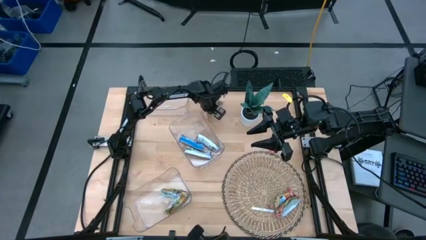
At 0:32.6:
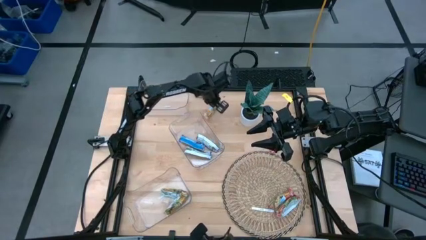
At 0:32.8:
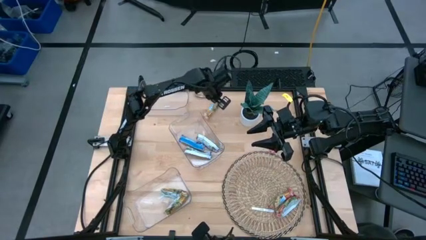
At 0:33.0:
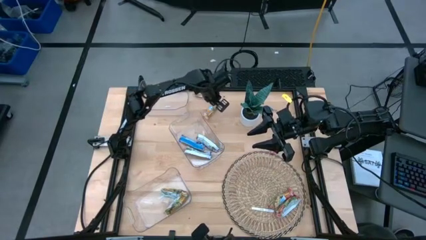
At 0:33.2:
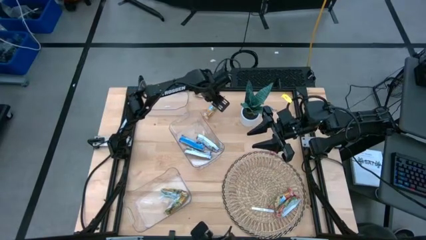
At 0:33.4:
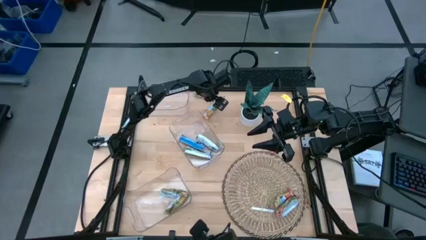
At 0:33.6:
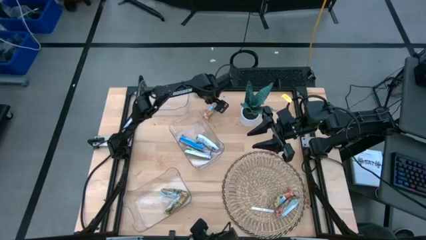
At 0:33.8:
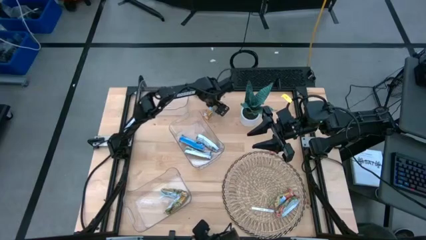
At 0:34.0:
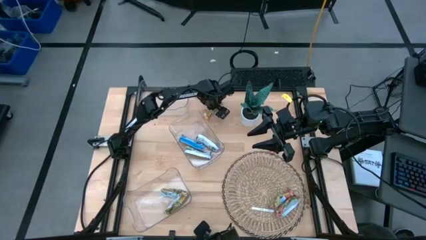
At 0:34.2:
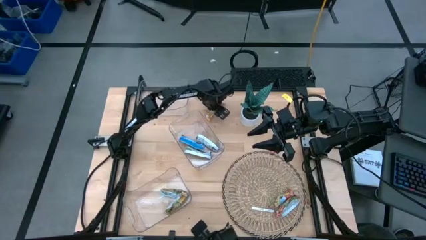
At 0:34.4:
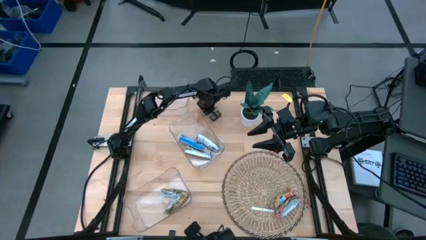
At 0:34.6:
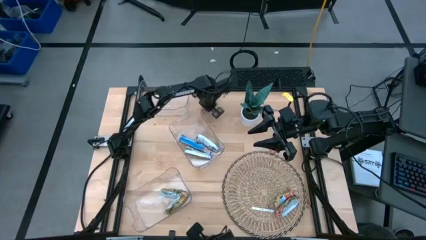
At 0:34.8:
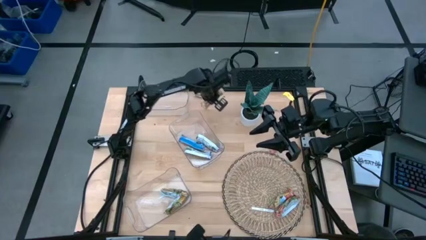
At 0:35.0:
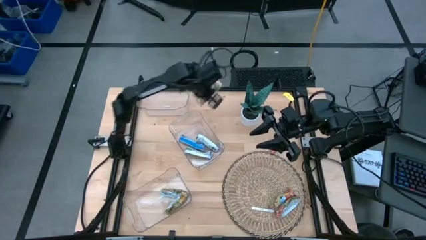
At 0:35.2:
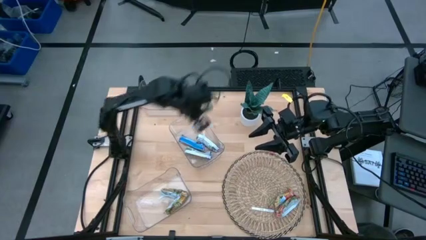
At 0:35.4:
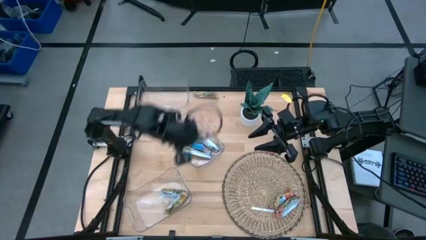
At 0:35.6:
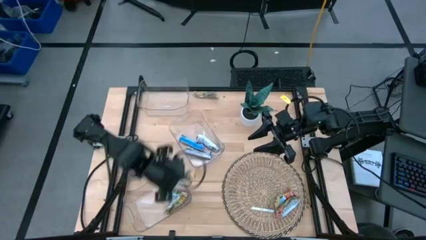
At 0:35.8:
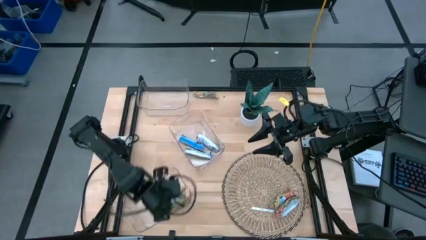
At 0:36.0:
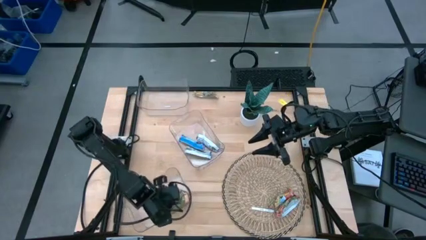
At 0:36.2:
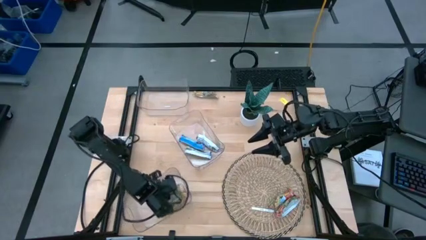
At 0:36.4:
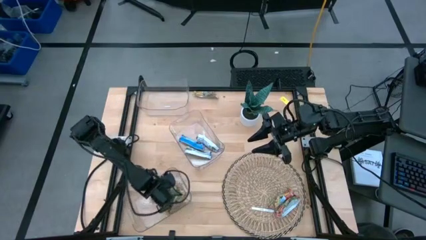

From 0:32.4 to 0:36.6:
Task: Pick and place Granola Bars by type
Put the yellow granola bar into the bottom transparent bin

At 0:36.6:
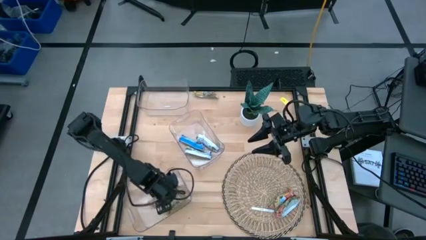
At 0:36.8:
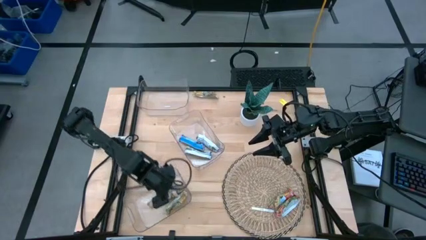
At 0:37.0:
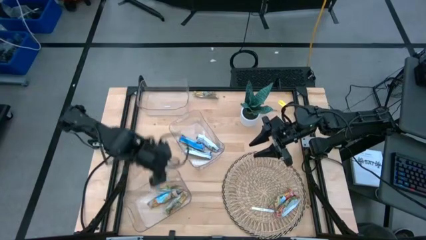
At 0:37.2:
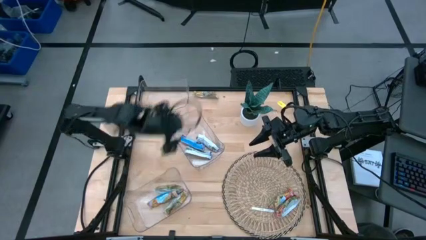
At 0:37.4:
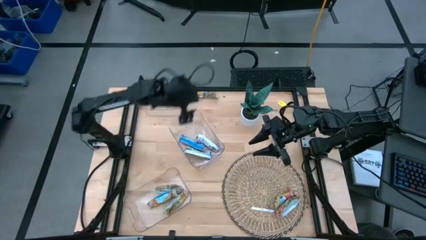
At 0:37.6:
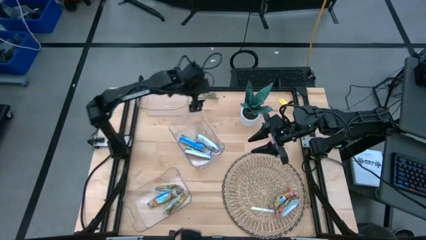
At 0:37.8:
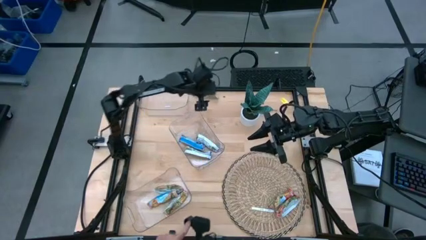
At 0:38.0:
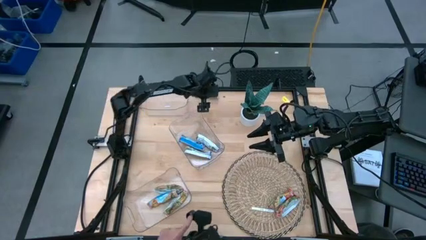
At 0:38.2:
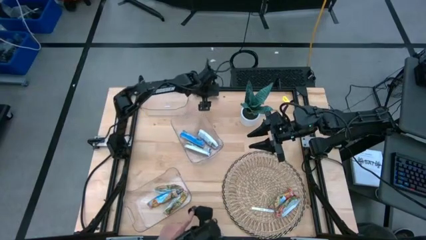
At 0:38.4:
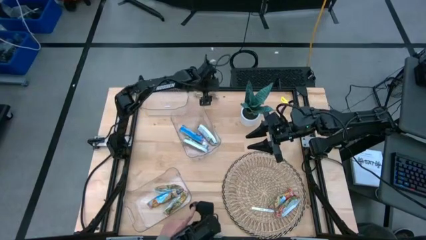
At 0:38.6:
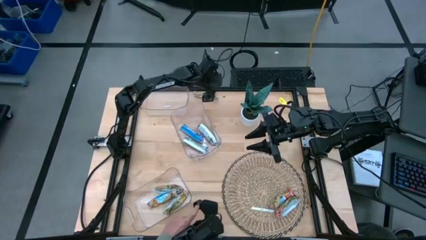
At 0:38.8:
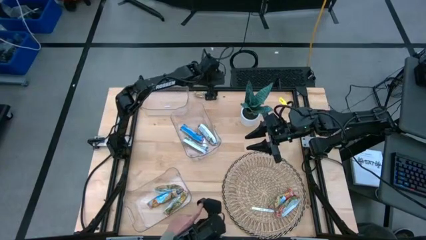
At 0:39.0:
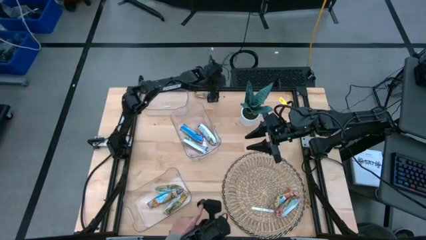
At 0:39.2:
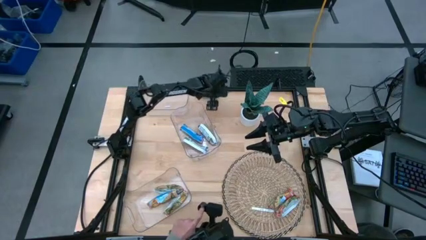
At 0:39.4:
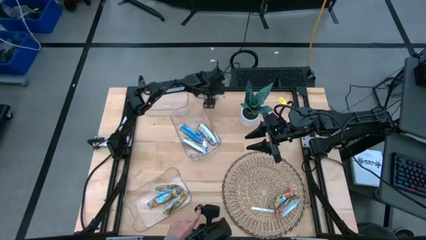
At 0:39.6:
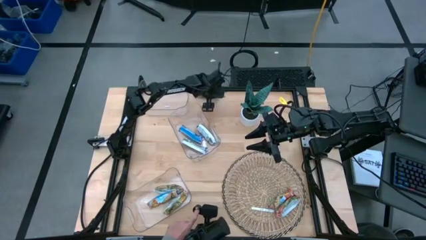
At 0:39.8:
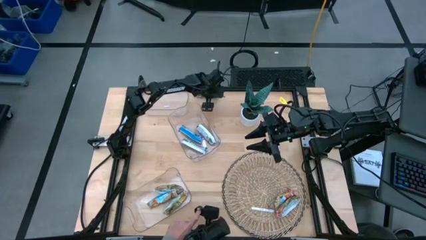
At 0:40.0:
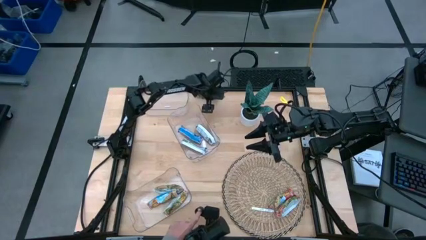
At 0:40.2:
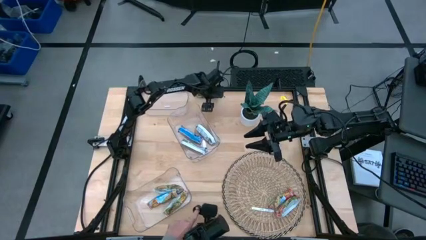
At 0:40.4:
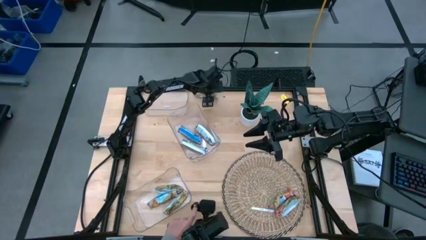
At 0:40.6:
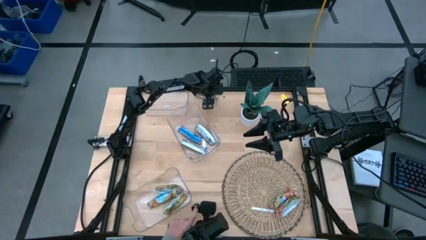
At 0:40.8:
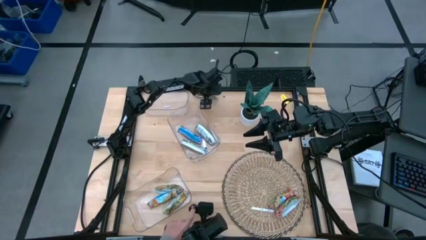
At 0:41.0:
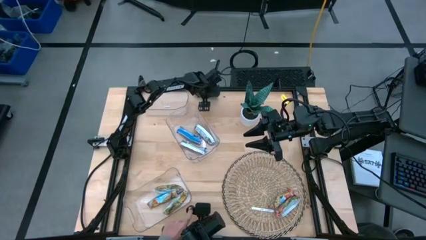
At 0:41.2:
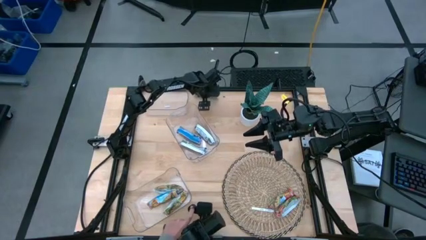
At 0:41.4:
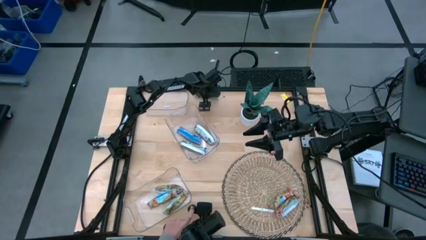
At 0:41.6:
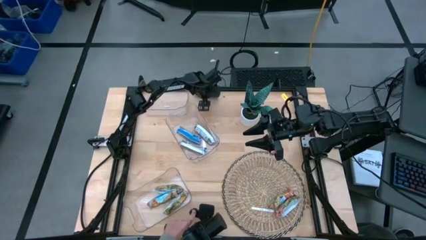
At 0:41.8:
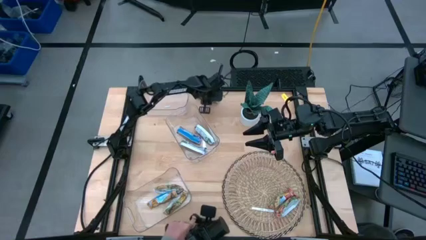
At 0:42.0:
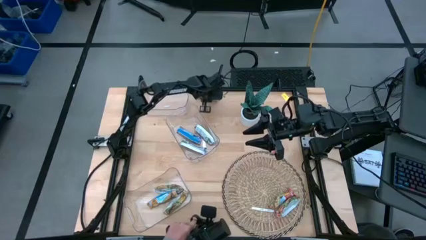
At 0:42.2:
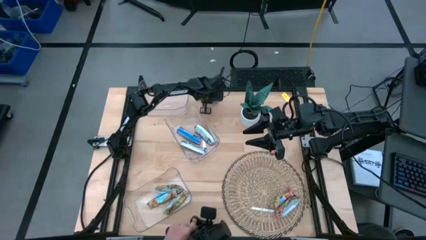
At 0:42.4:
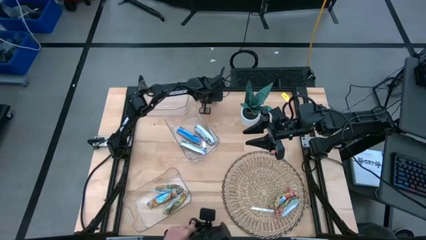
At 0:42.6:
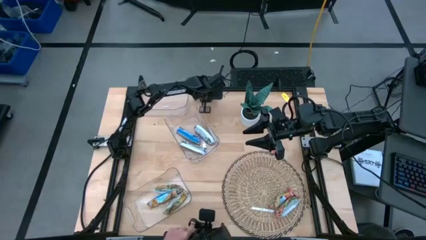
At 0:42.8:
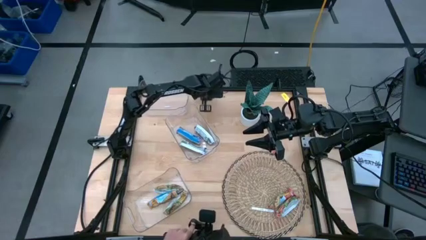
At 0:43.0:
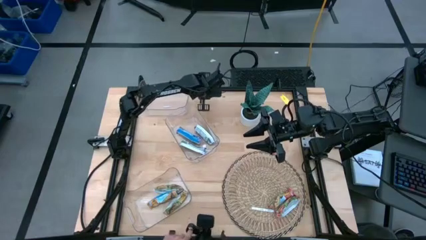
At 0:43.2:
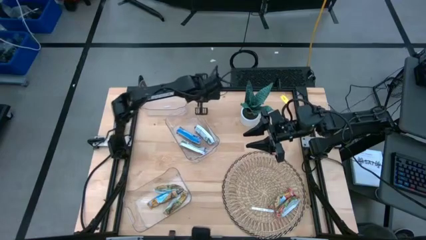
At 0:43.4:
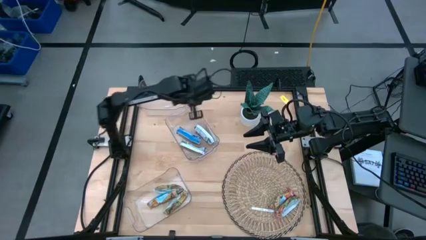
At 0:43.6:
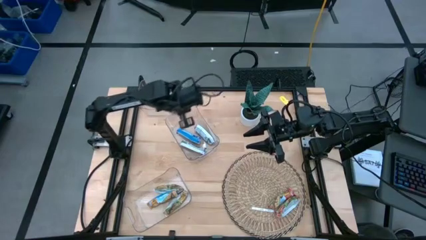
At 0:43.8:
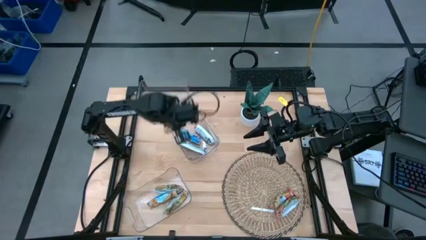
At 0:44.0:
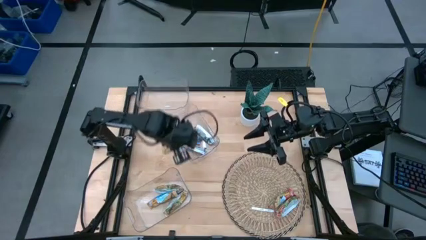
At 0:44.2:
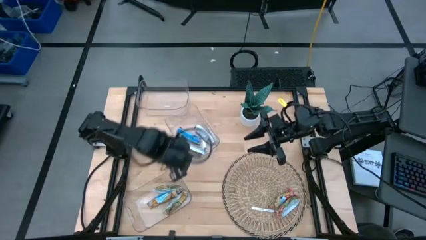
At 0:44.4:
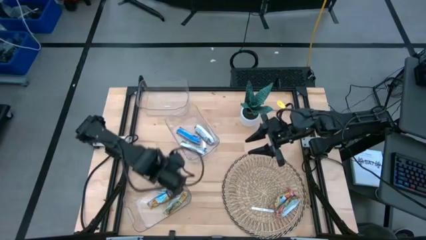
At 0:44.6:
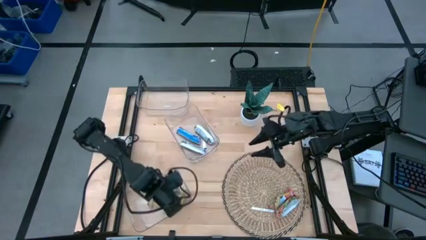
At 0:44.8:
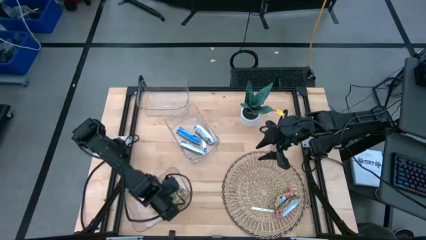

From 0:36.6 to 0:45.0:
Put the yellow granola bar into the bottom transparent bin

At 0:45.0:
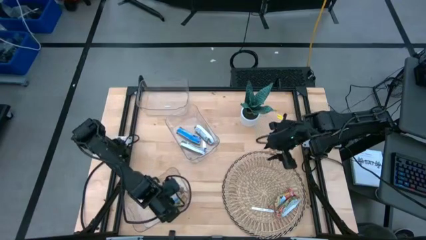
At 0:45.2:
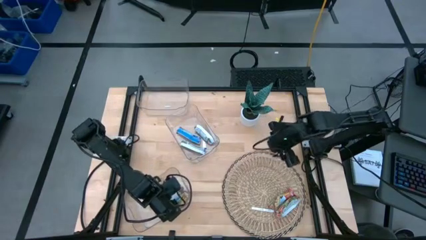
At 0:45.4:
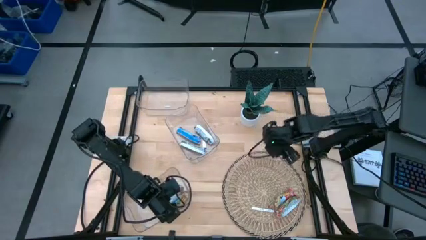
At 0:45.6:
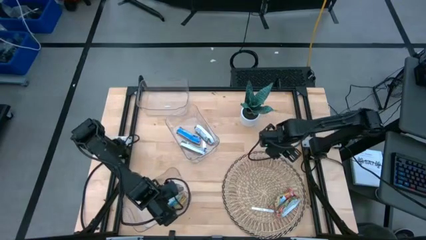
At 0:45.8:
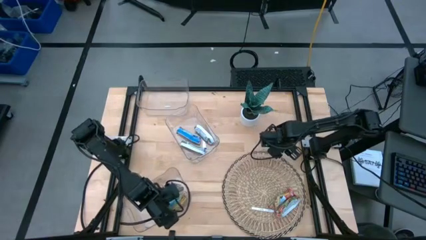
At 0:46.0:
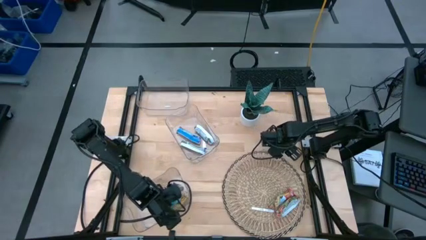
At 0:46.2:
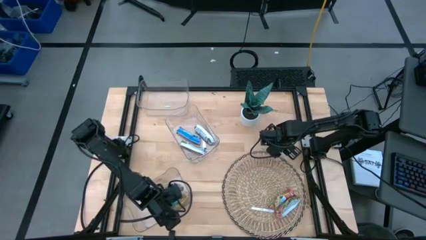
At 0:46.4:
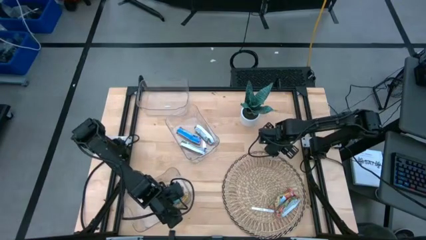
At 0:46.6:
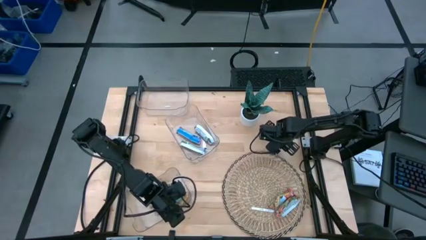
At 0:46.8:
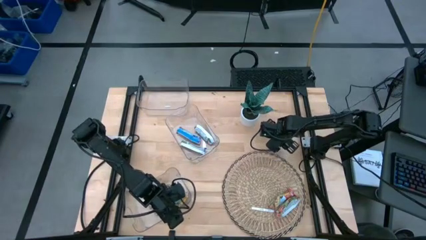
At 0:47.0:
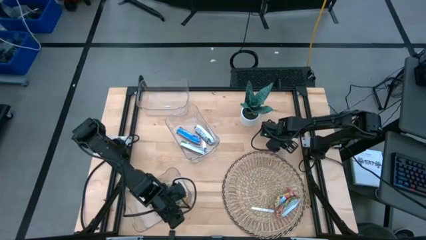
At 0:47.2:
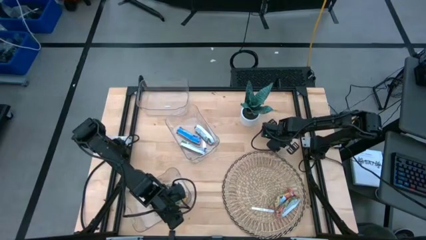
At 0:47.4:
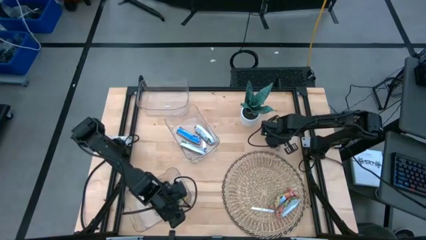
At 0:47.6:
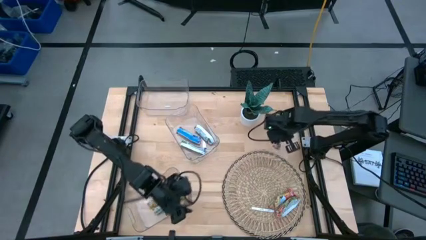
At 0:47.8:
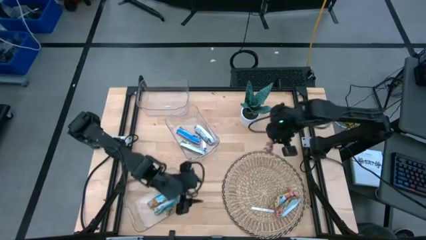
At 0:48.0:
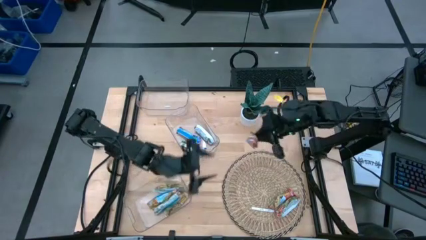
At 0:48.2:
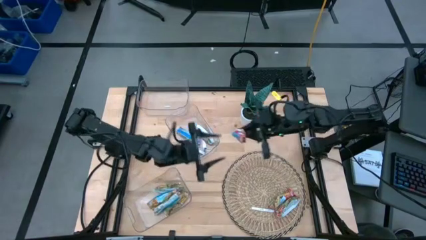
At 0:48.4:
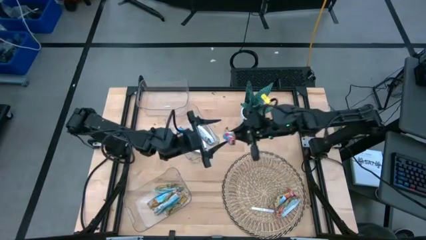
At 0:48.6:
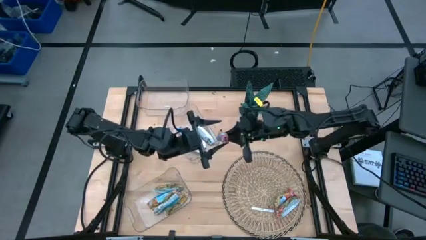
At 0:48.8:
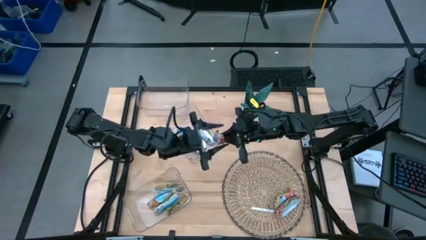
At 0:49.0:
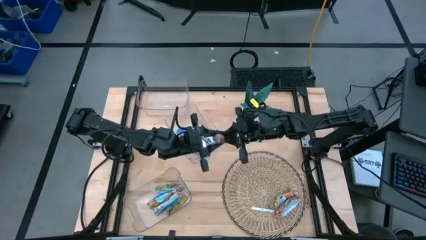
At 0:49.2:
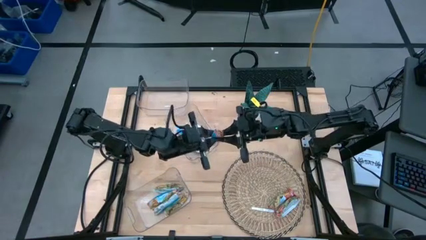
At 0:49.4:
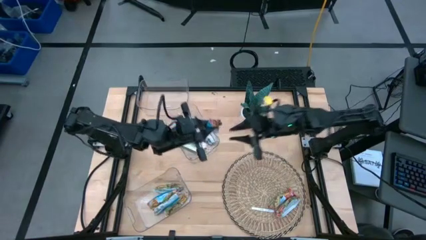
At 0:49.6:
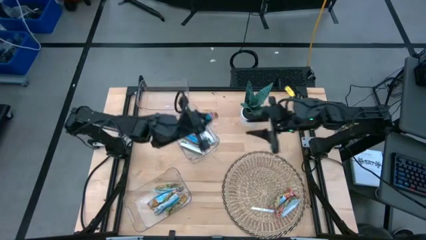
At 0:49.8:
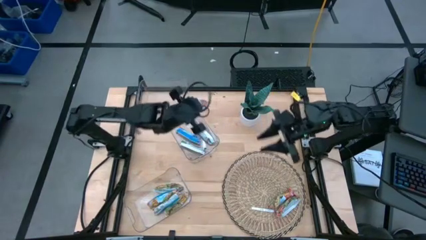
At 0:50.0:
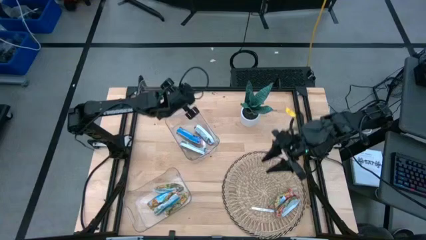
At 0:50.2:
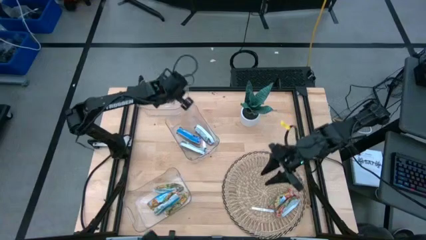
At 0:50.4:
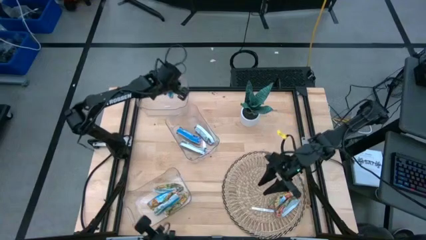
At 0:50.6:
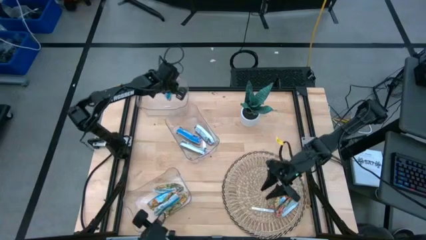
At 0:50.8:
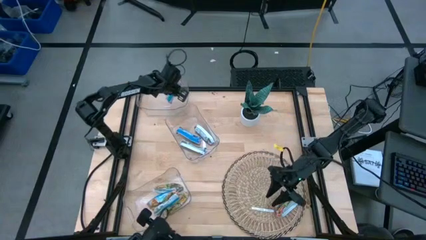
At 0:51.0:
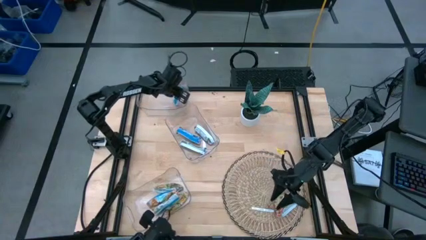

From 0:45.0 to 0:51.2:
Put the red granola bar into the top transparent bin
